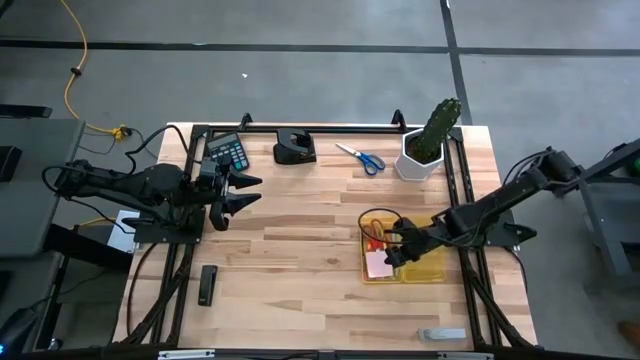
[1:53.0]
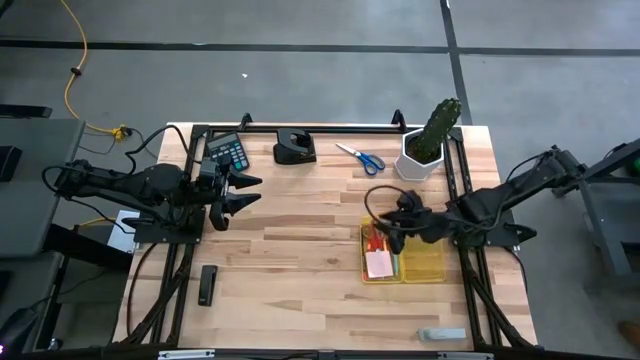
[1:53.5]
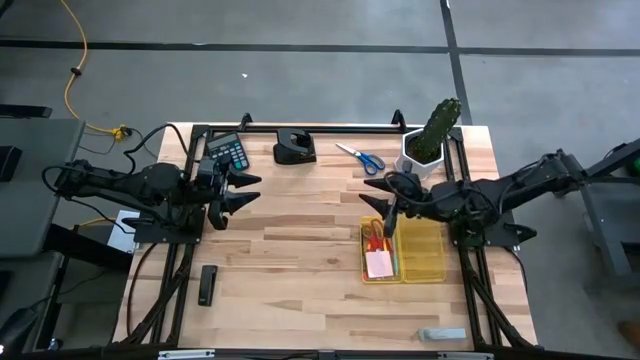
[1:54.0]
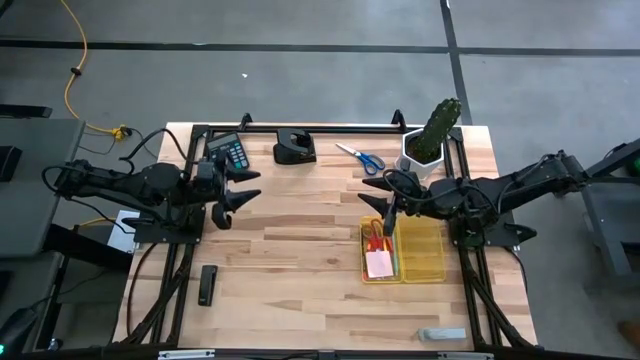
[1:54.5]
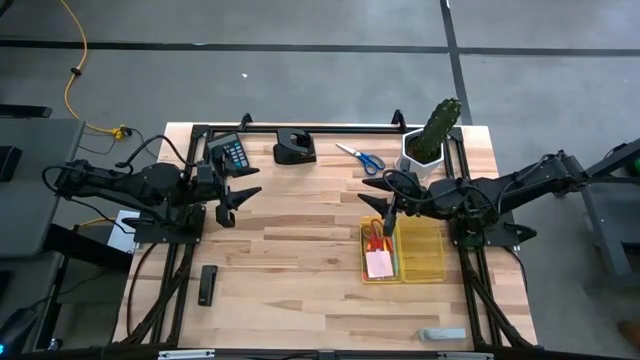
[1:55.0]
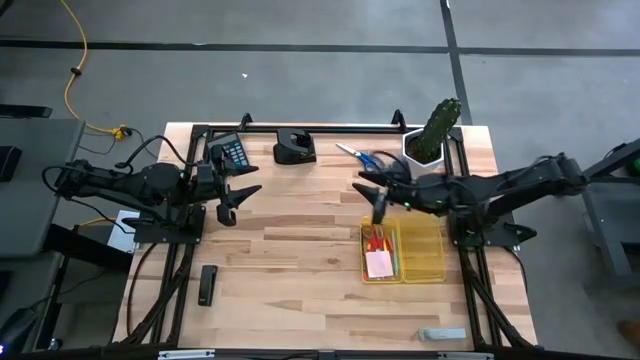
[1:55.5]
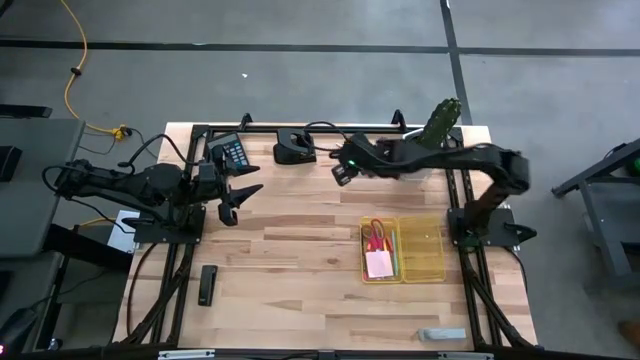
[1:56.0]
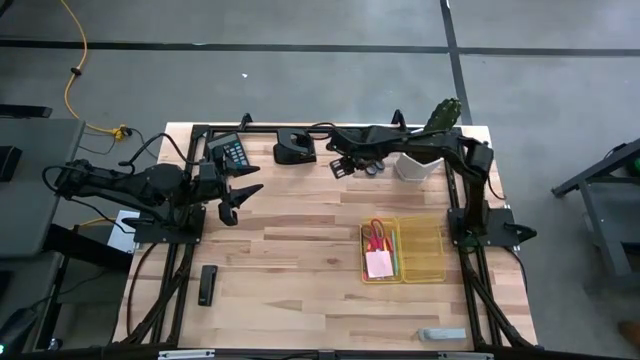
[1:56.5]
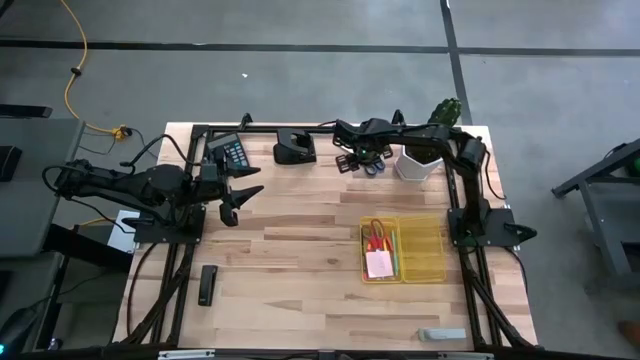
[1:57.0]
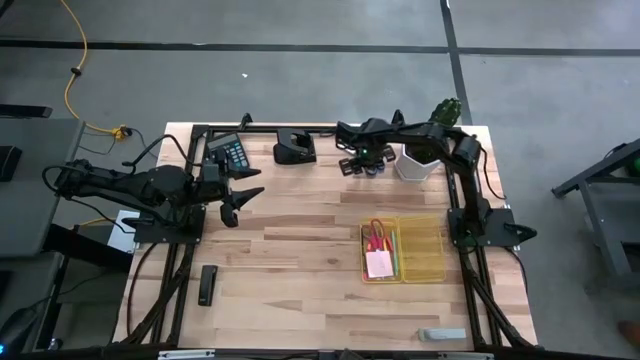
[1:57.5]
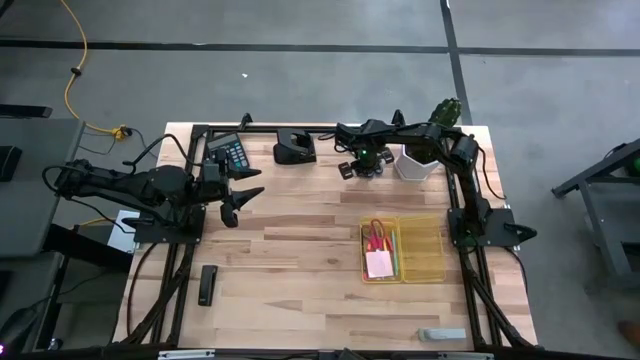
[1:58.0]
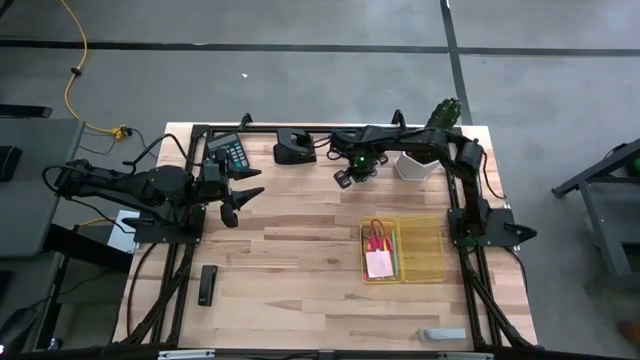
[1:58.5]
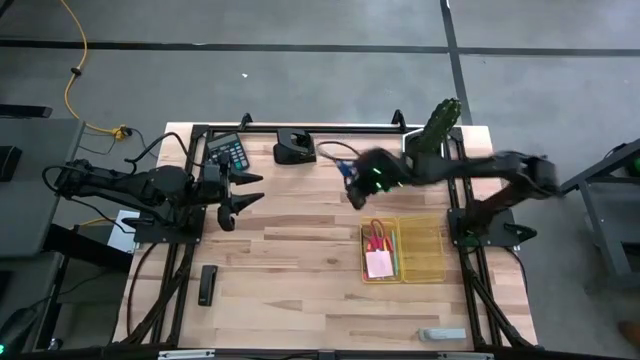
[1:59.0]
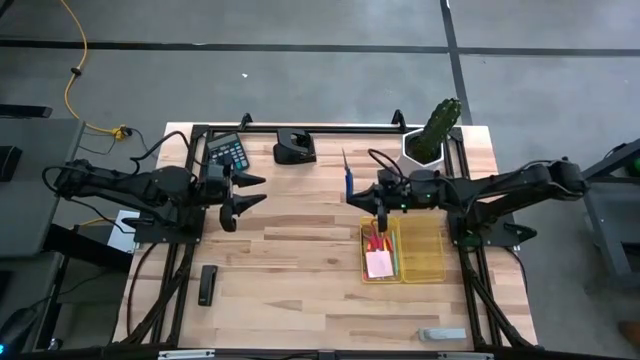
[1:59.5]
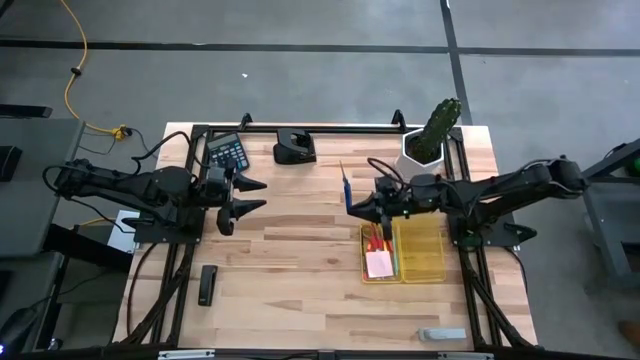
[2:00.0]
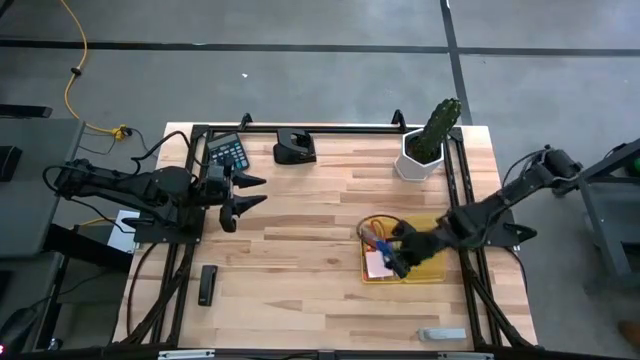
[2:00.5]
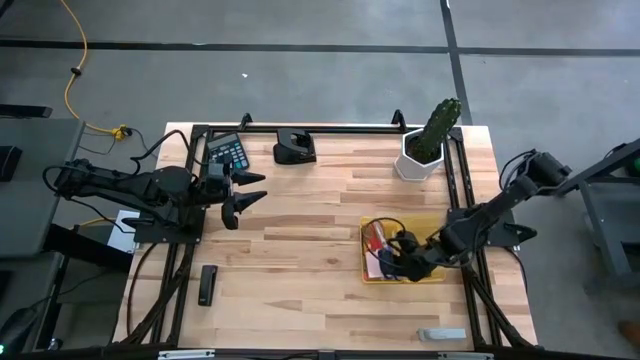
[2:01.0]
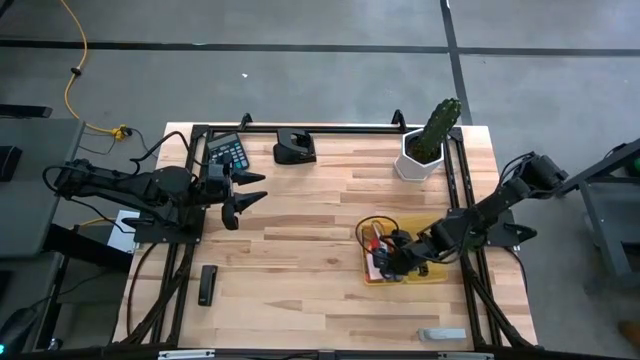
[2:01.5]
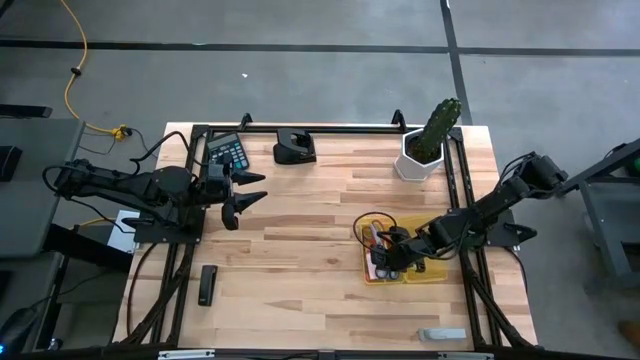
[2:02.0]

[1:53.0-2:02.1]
Task: Pack school essentials
Put the blue scissors into the yellow box

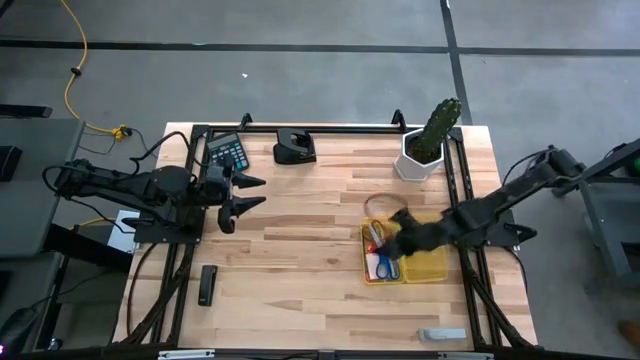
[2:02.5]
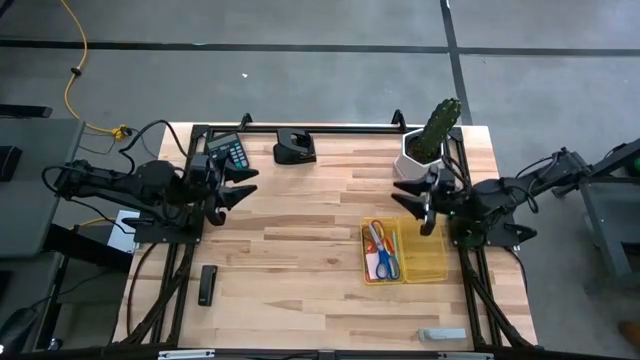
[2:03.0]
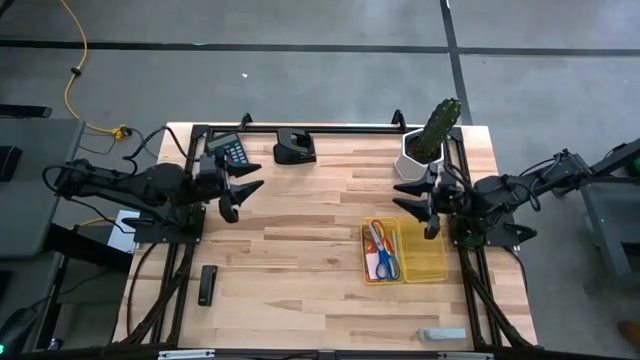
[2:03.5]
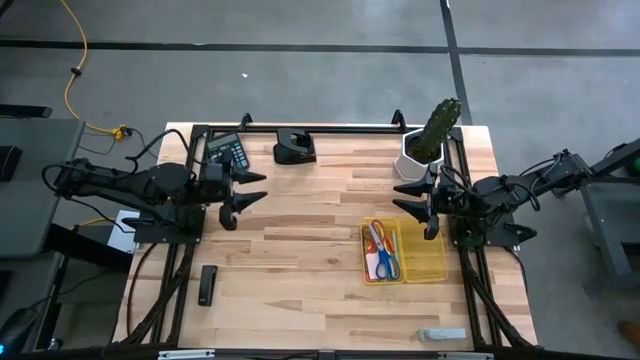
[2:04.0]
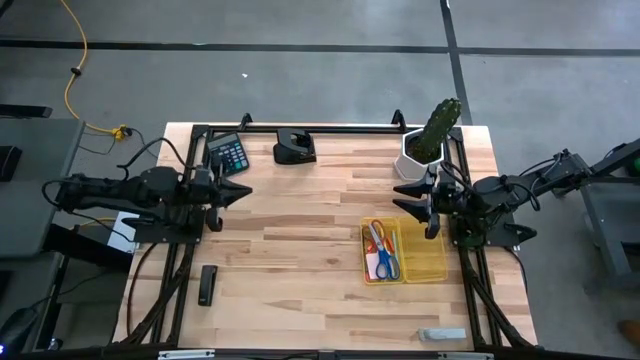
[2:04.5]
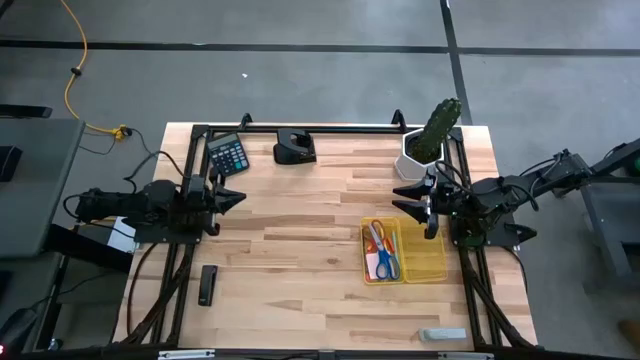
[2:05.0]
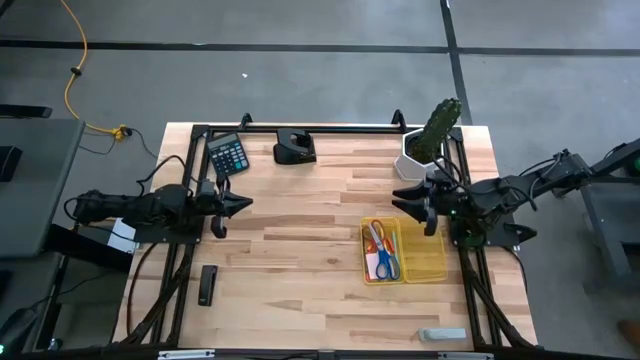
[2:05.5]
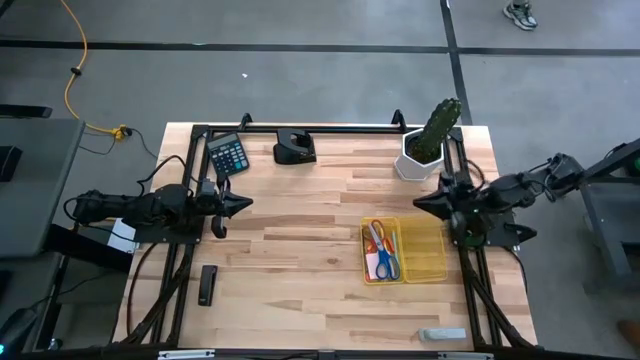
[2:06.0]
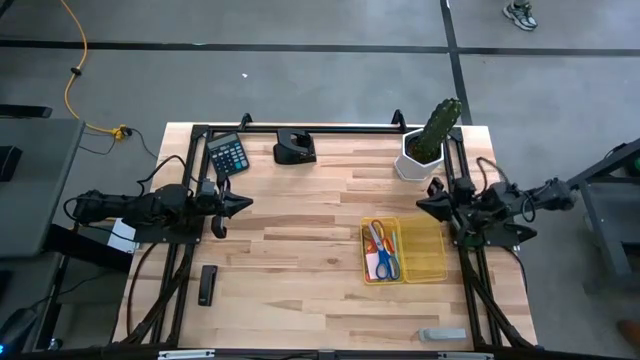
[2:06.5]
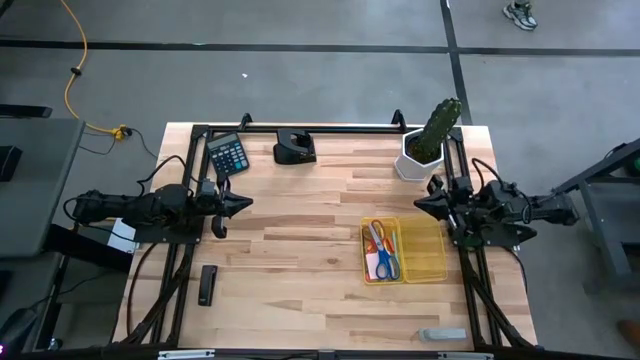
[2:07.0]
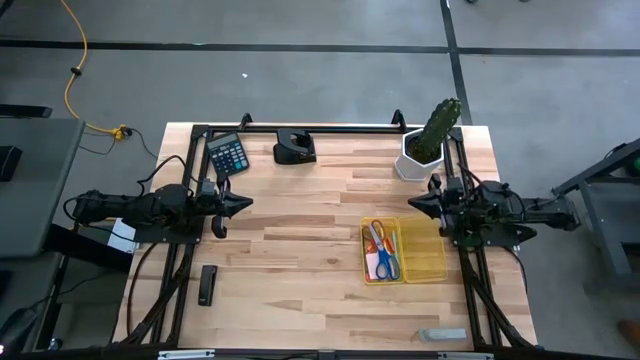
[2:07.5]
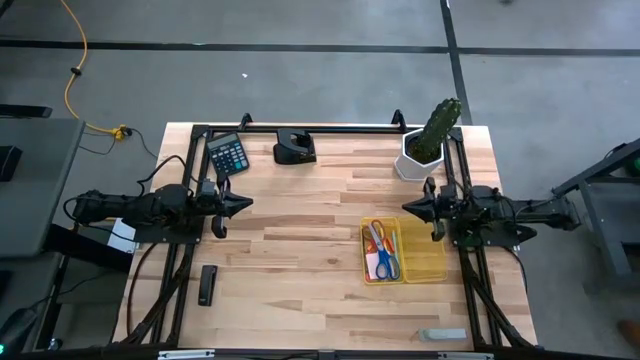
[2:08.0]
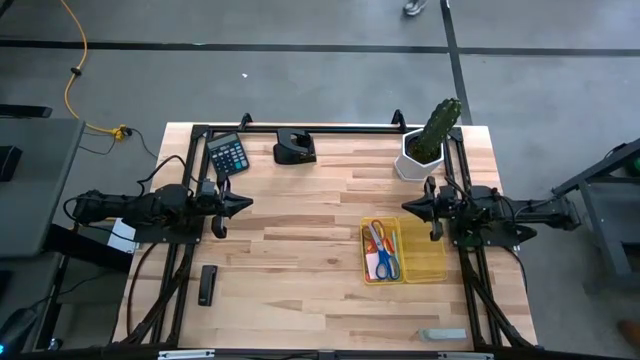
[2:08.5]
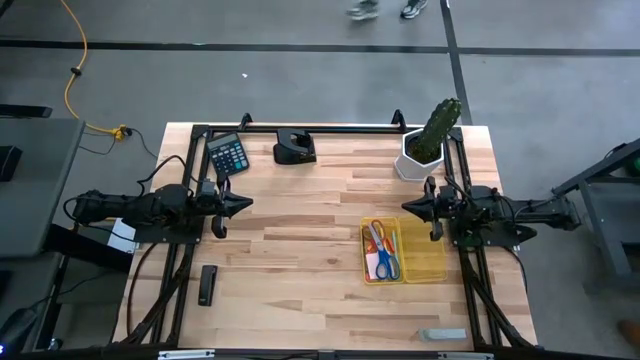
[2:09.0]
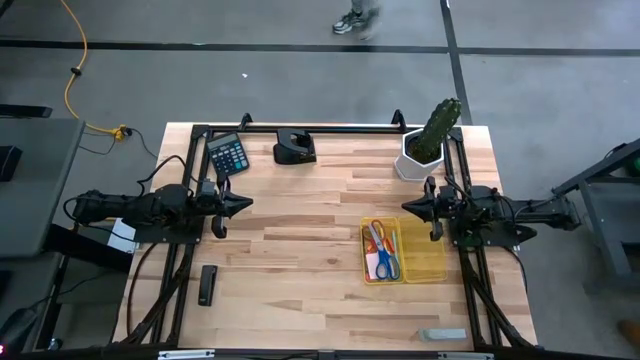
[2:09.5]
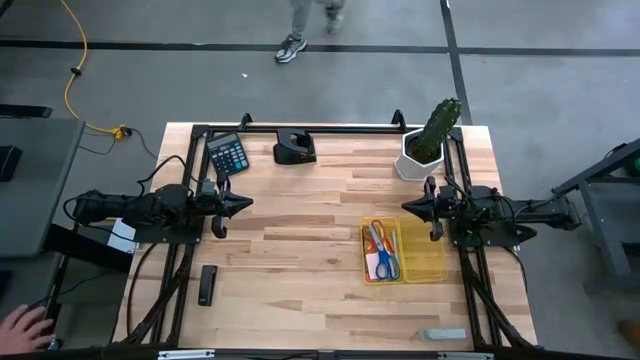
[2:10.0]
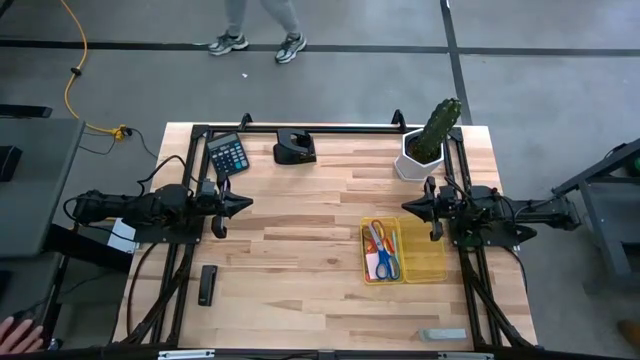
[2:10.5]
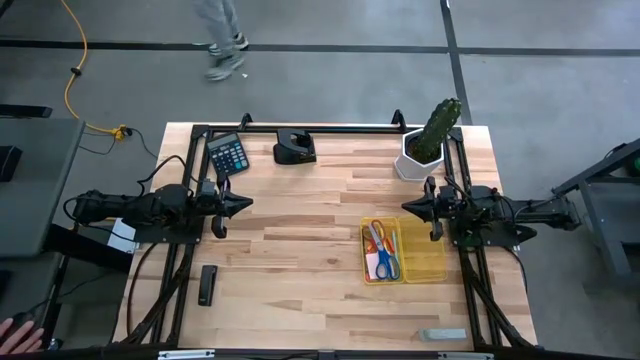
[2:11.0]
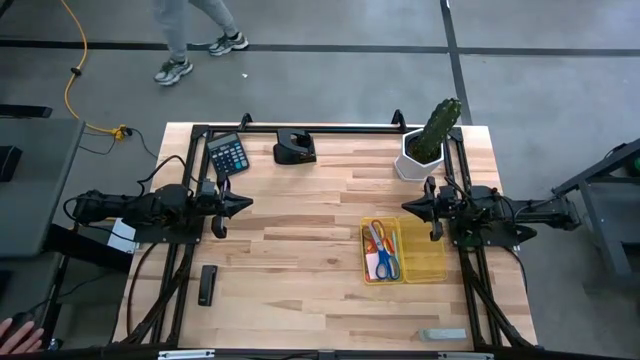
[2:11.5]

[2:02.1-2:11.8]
Return to Home Position

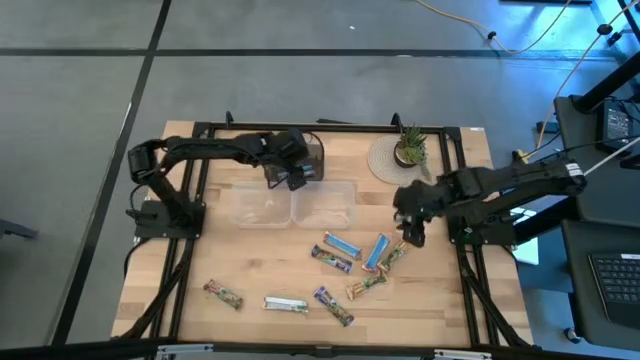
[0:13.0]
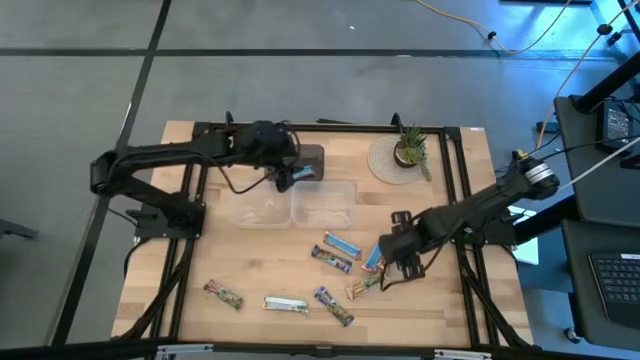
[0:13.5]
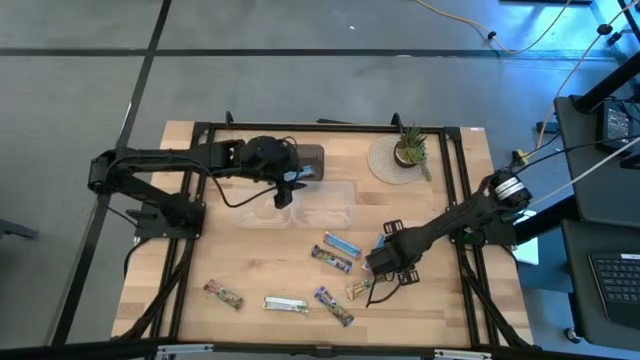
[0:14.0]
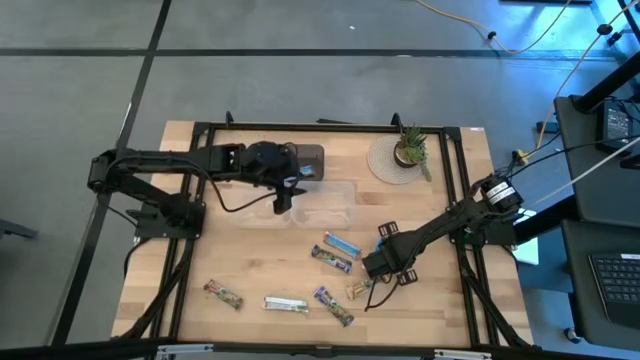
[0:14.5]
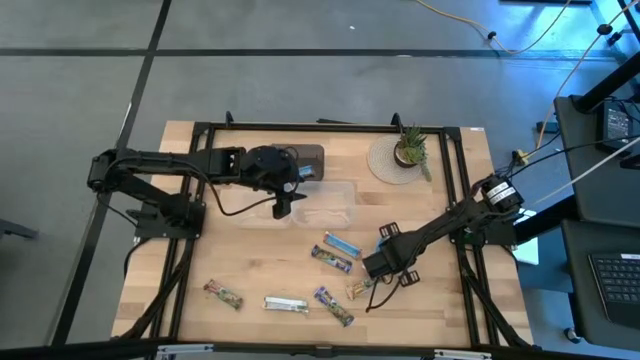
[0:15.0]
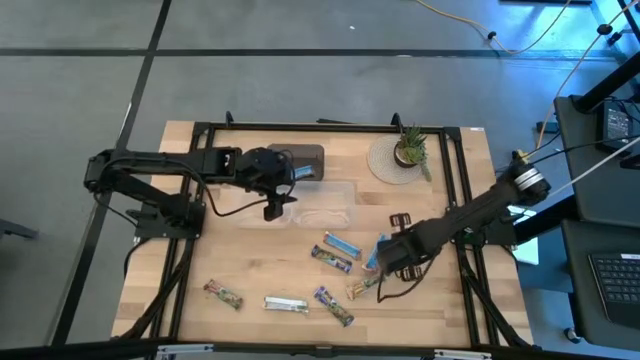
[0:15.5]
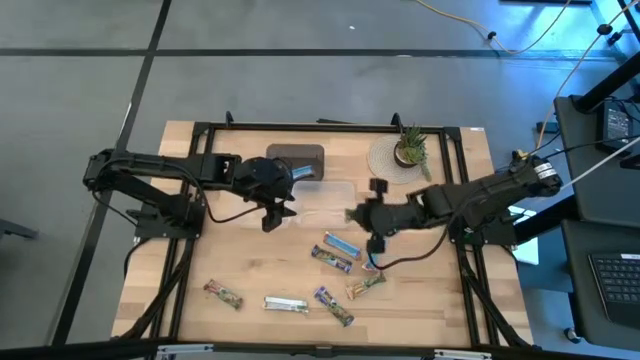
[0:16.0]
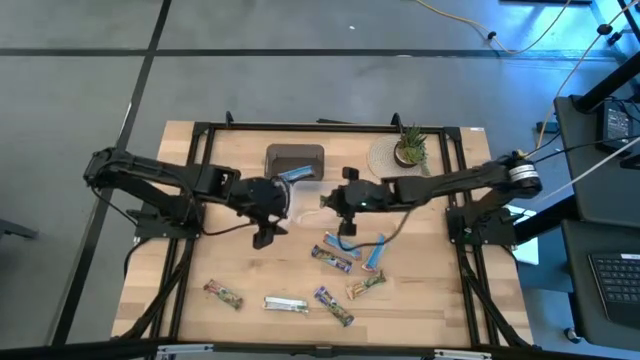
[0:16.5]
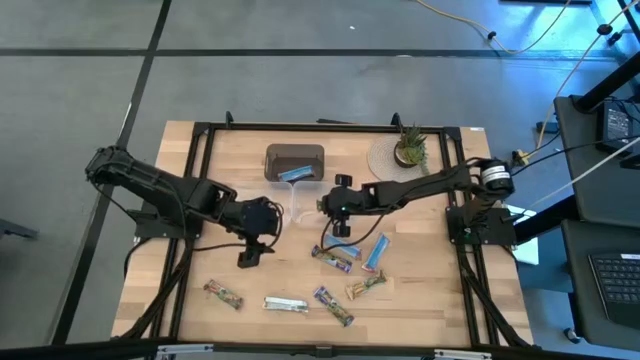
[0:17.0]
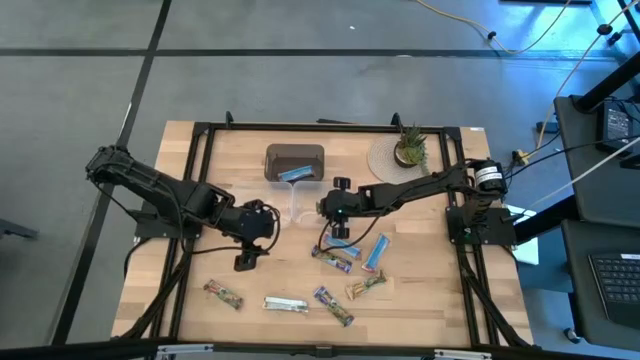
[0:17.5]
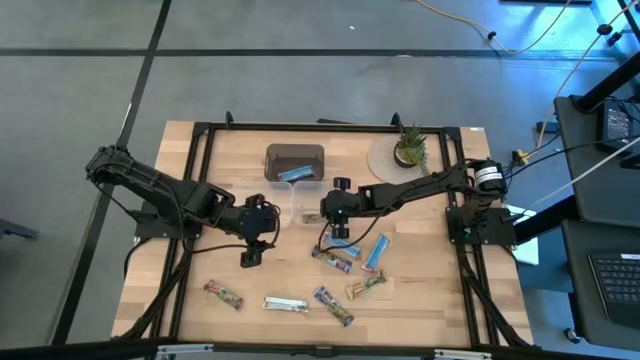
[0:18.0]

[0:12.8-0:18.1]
Task: Pick and place Granola Bars by type
Put the yellow granola bar into the right transparent bin
